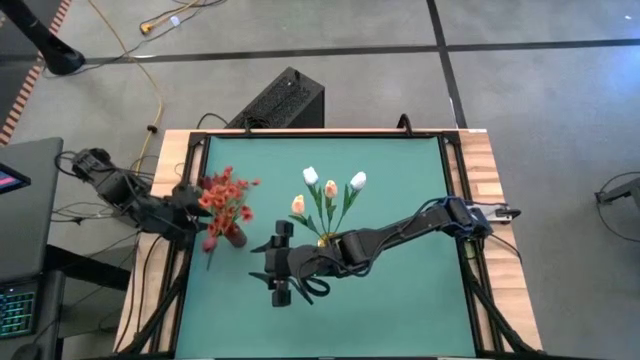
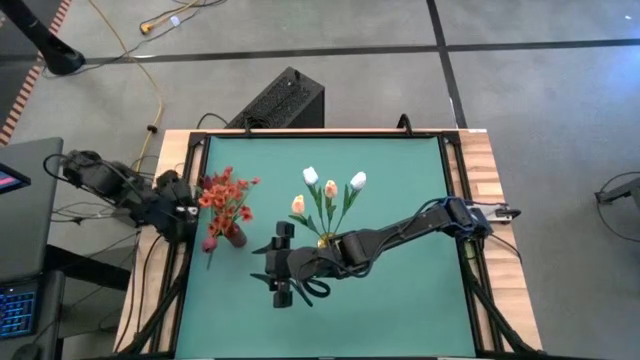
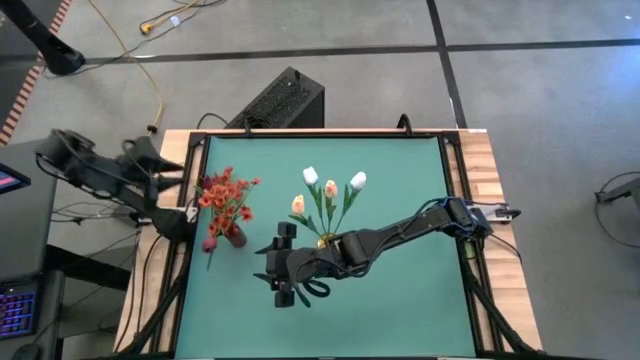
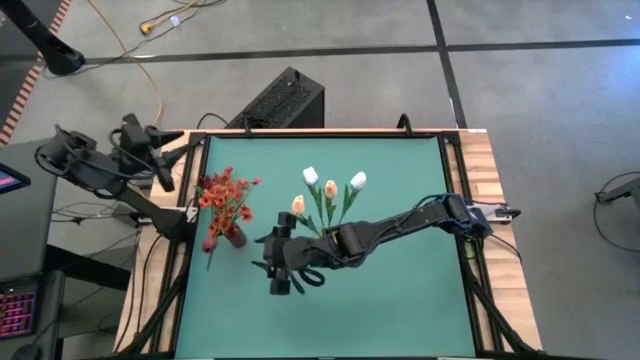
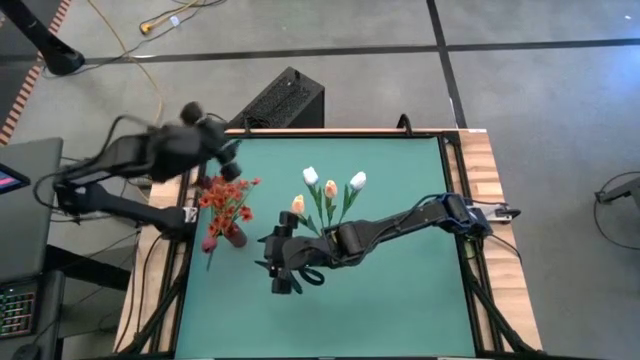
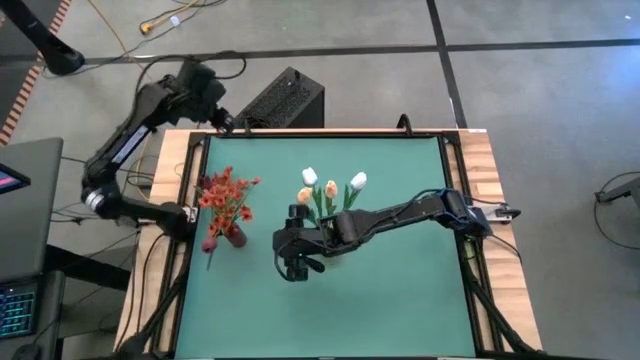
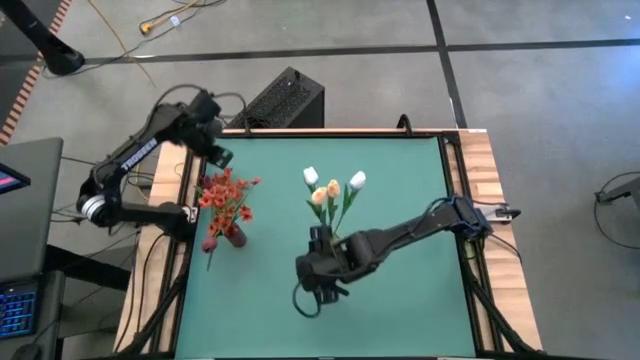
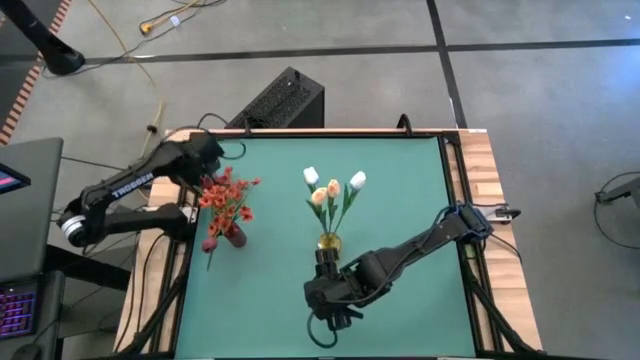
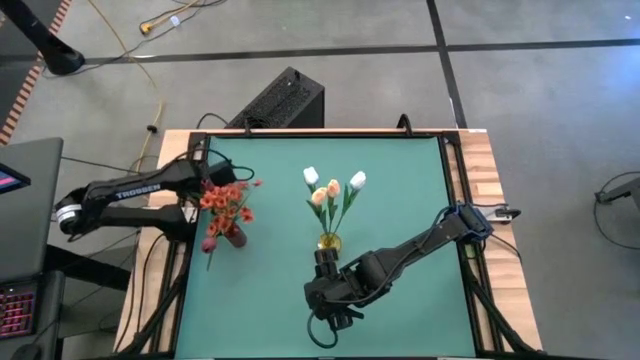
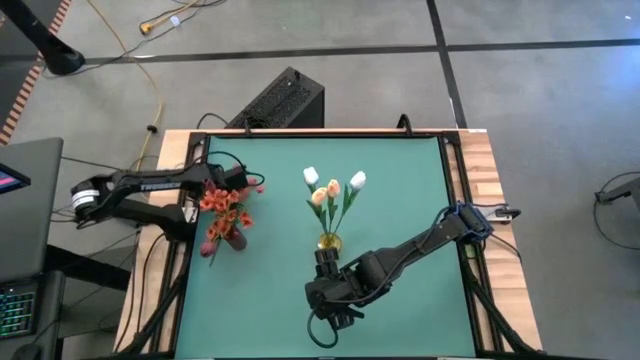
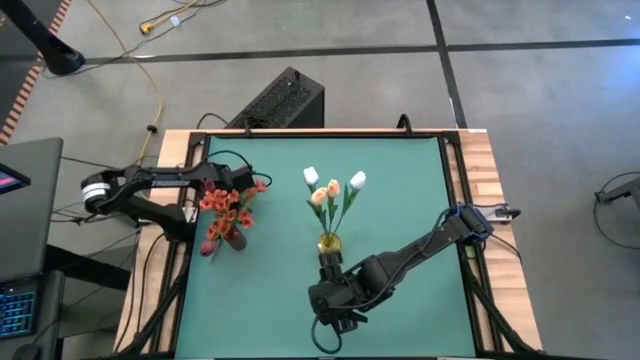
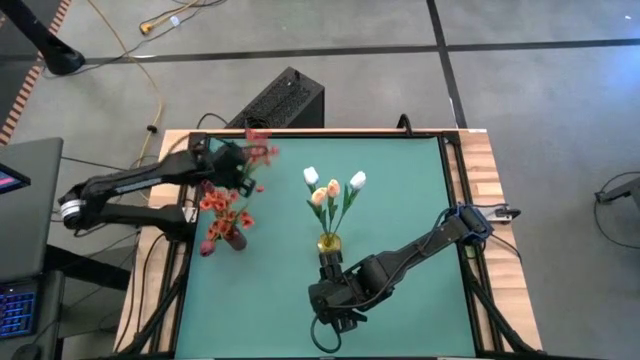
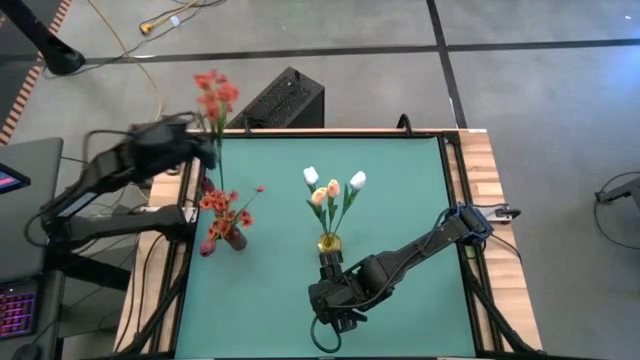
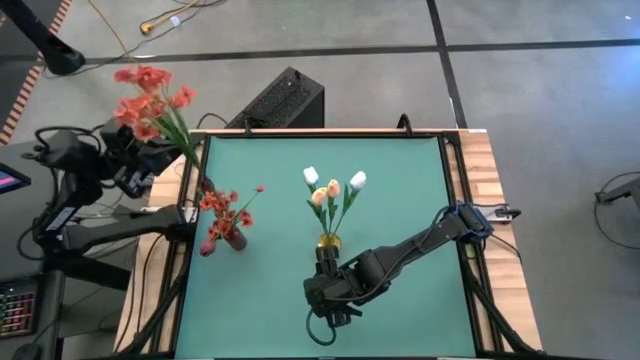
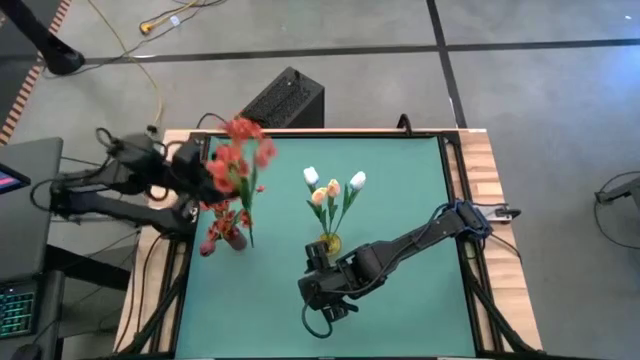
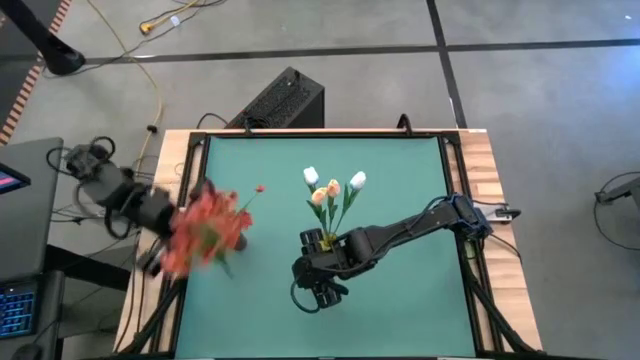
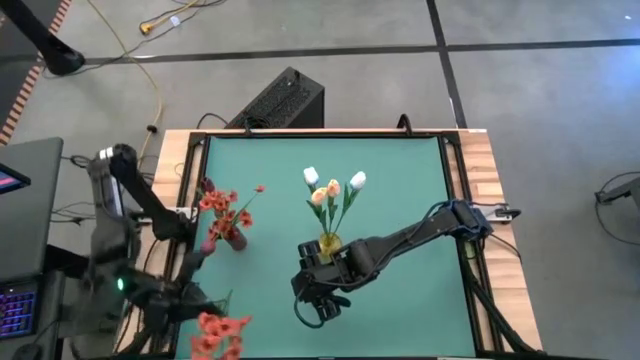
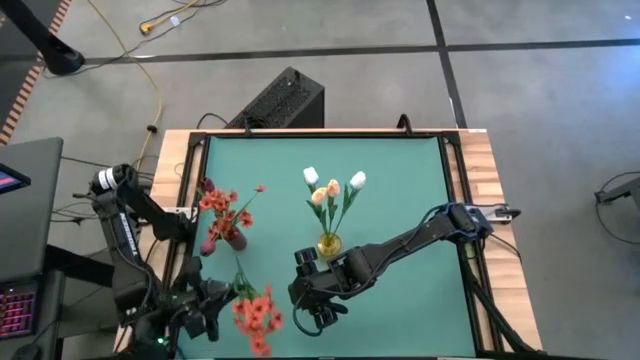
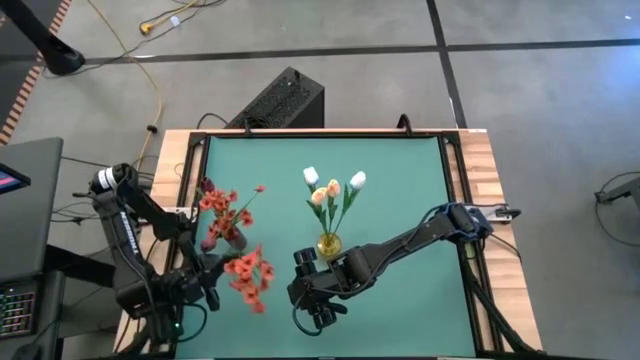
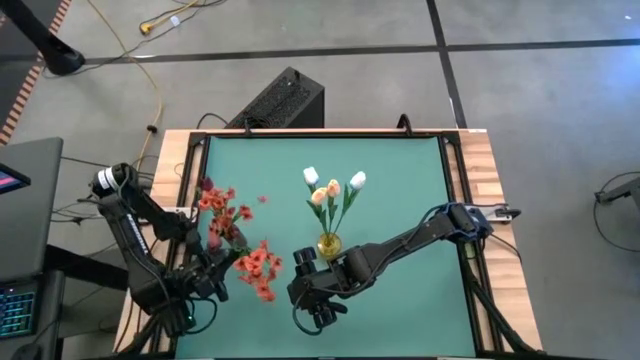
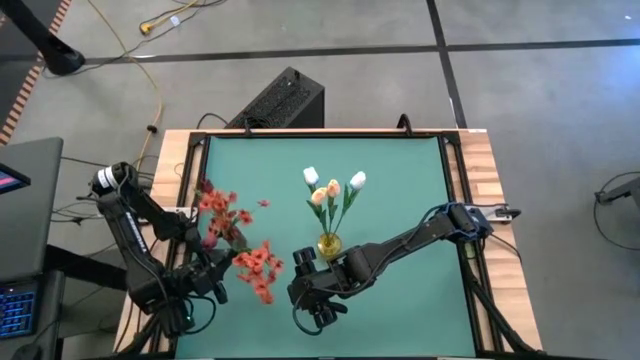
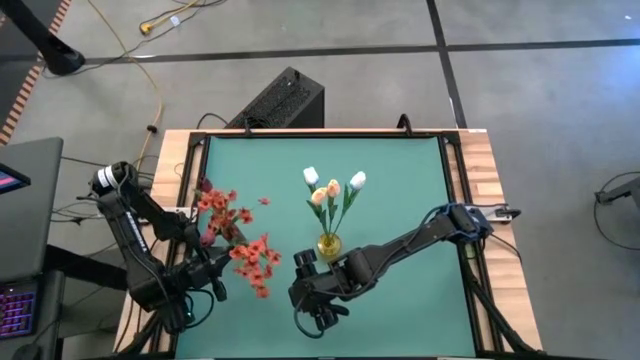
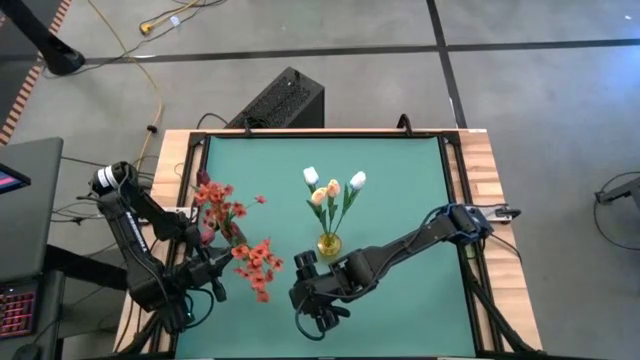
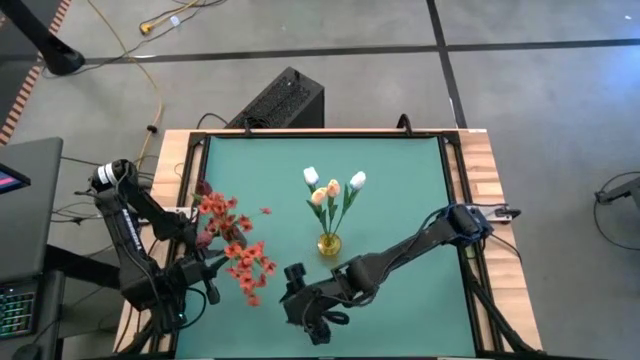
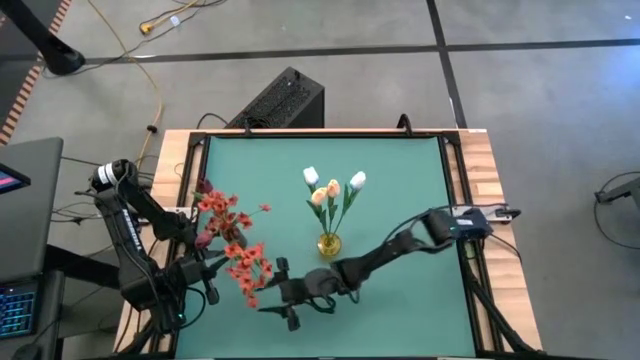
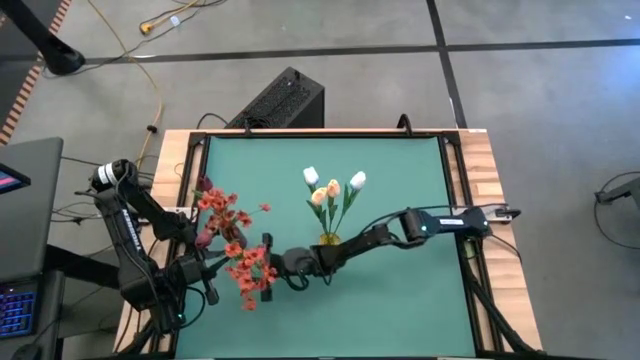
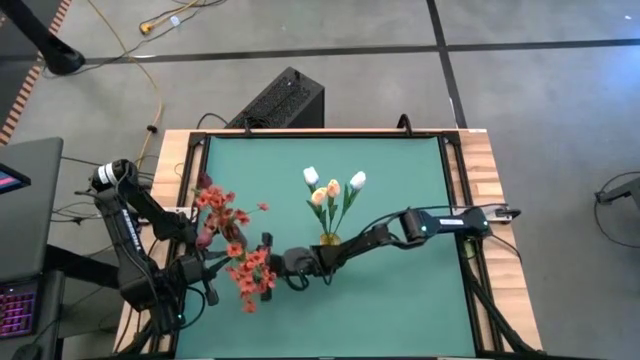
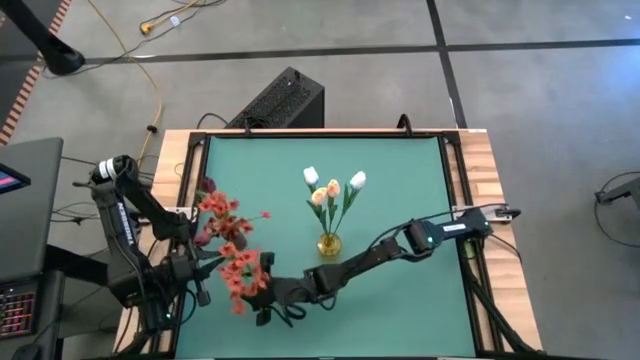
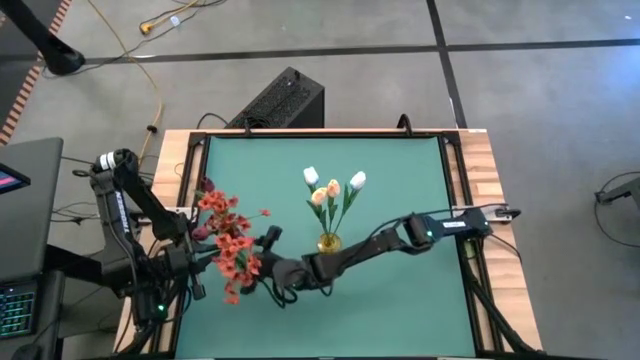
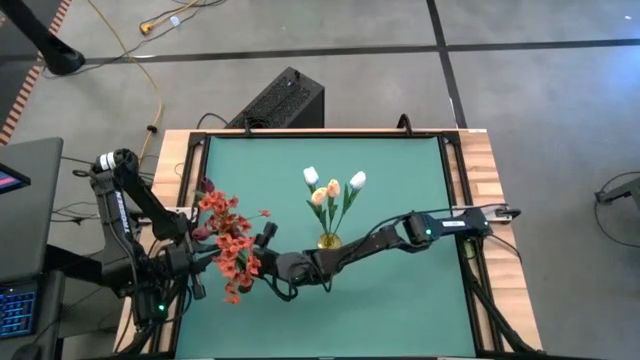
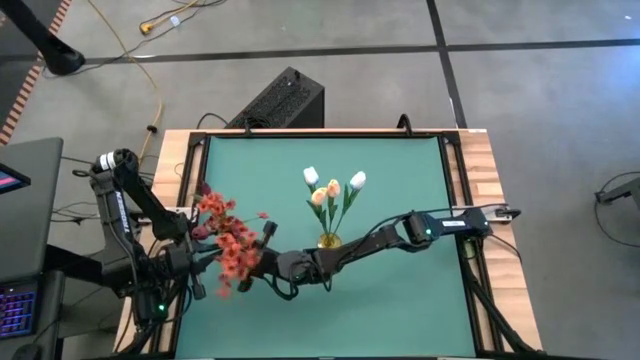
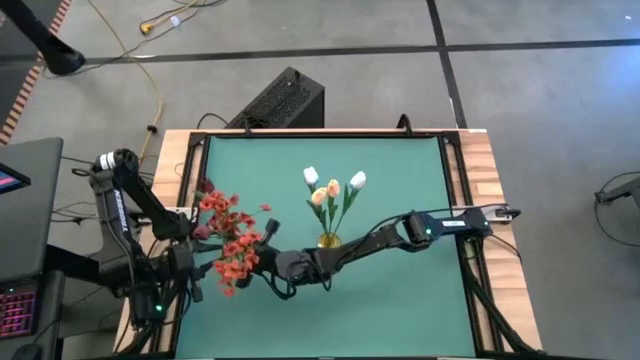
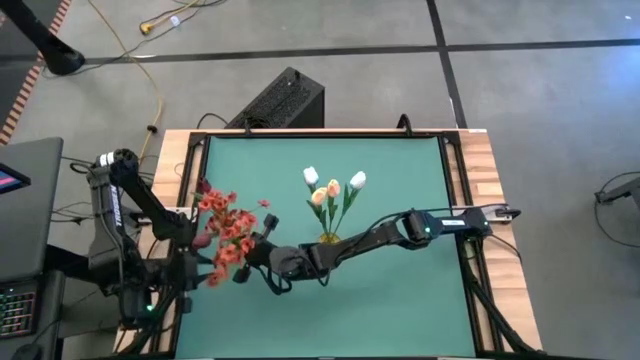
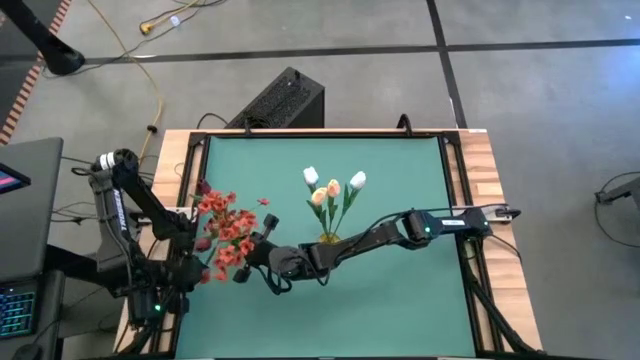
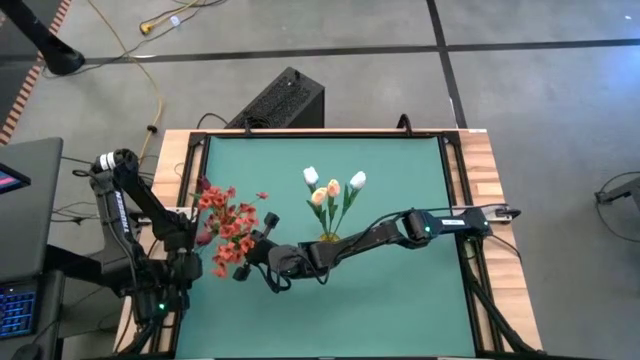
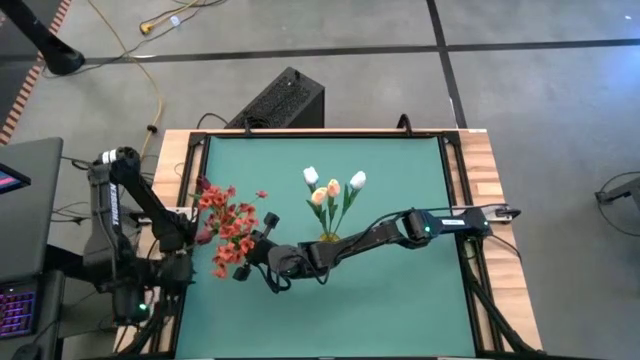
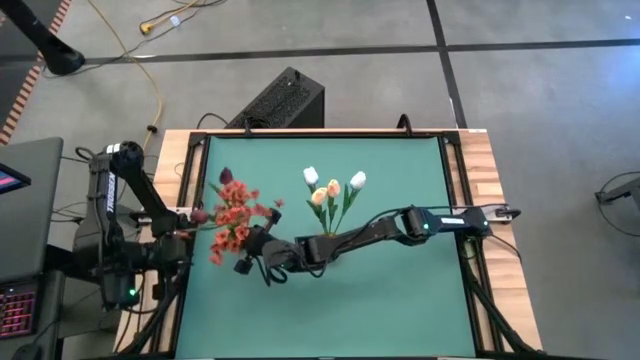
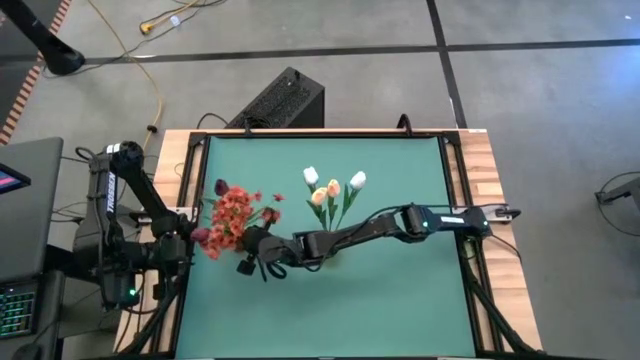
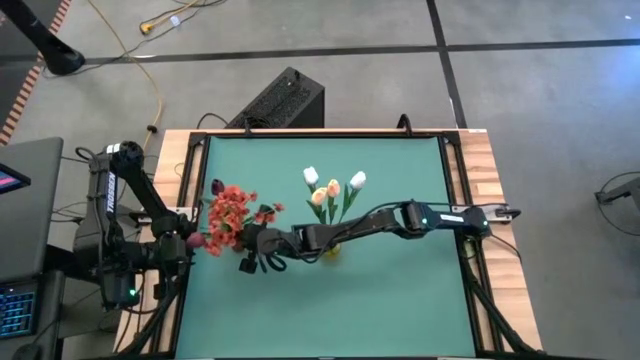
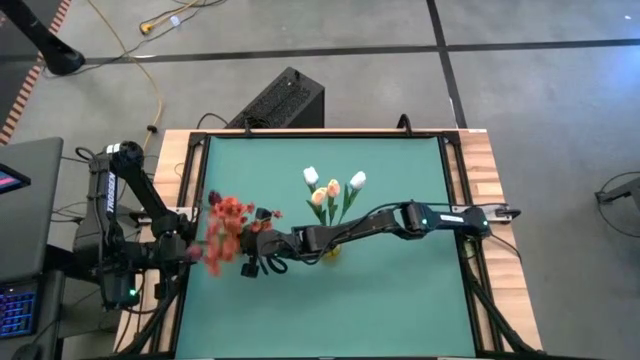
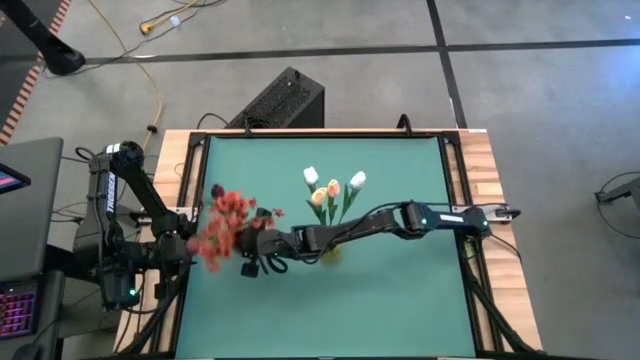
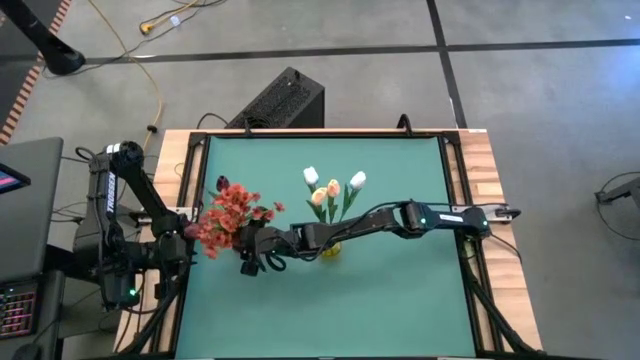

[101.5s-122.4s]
Task: Sort flowers into vase by color
Put the orange flowers into the red vase
